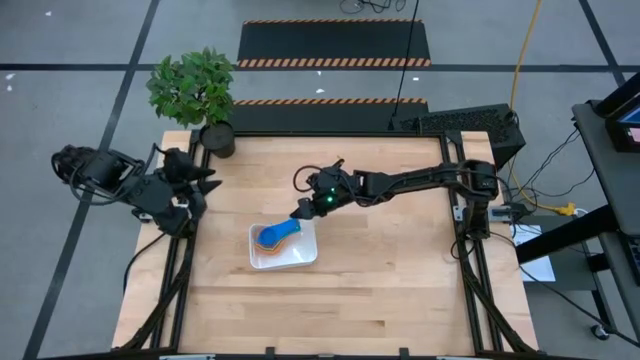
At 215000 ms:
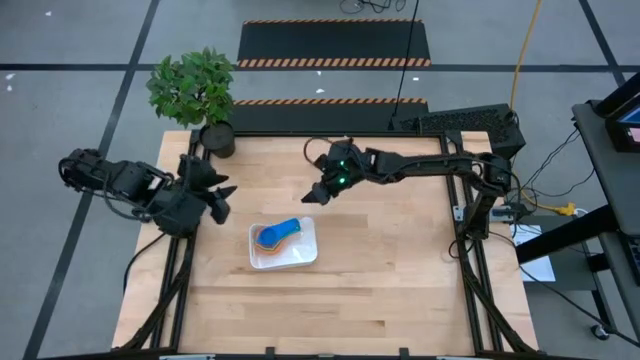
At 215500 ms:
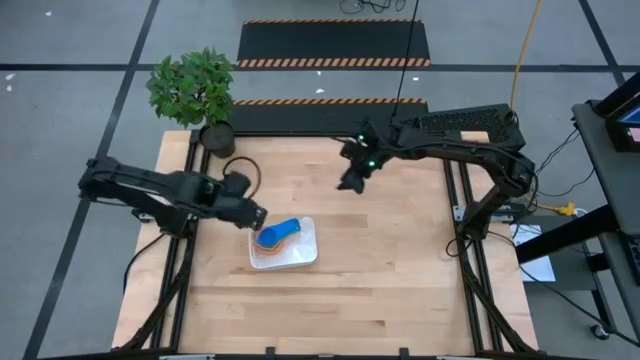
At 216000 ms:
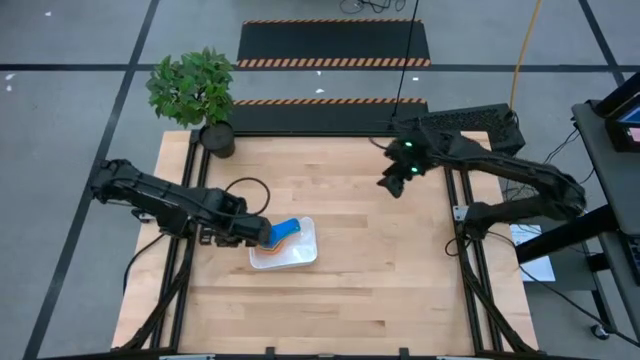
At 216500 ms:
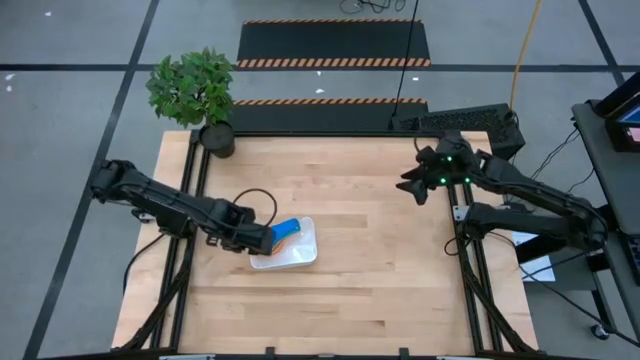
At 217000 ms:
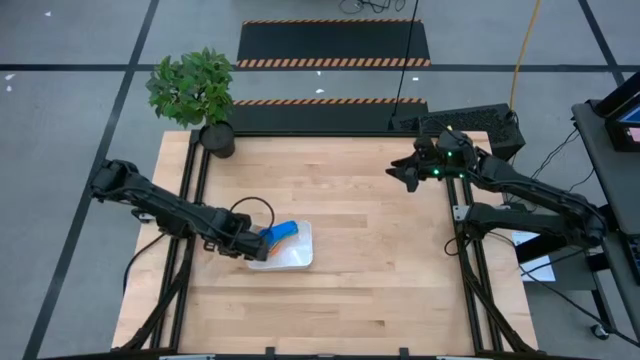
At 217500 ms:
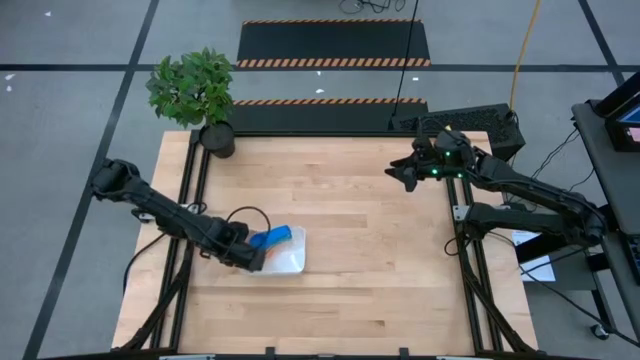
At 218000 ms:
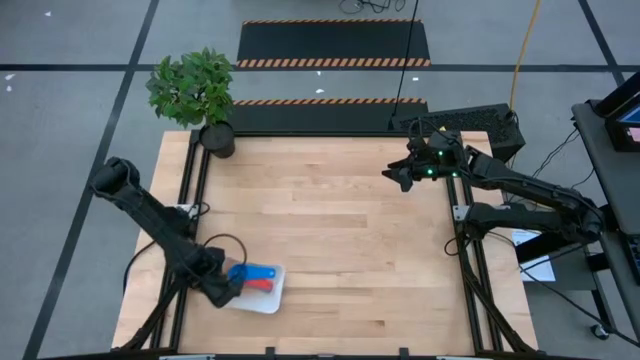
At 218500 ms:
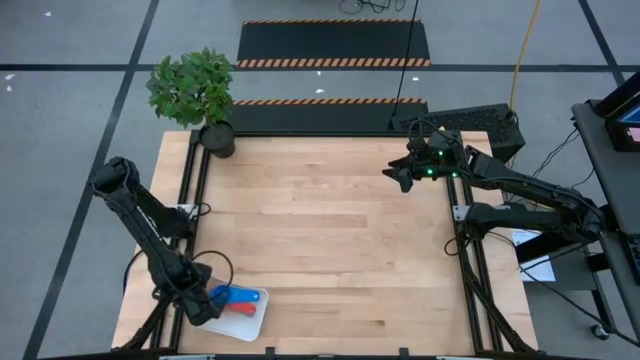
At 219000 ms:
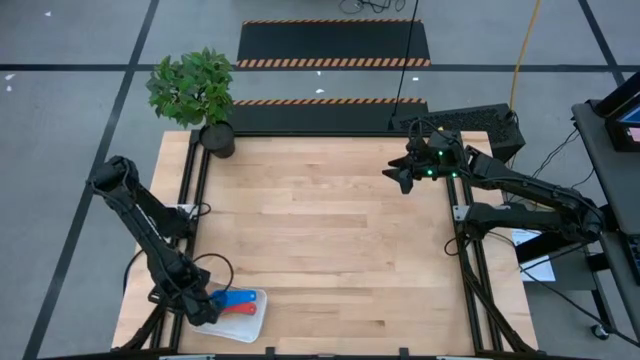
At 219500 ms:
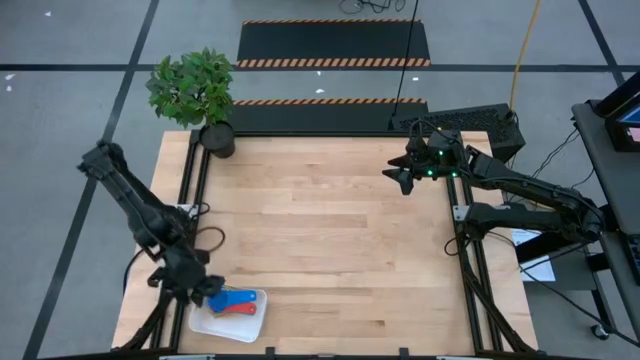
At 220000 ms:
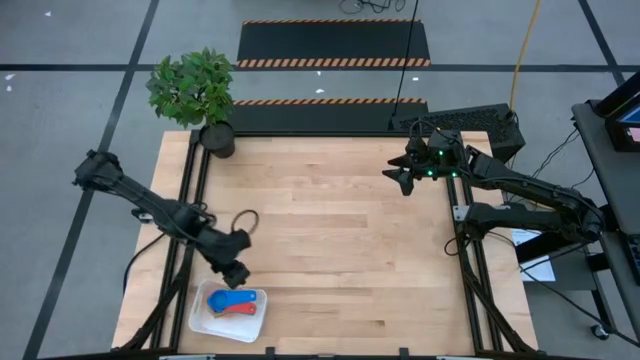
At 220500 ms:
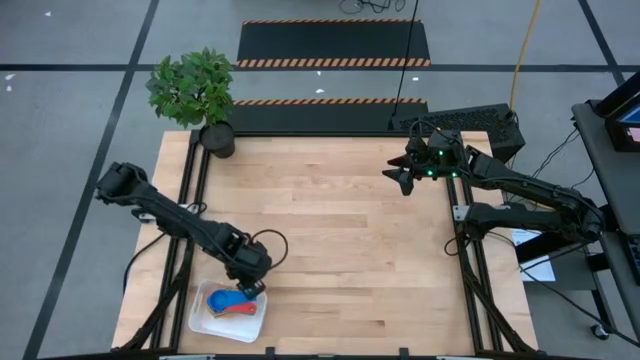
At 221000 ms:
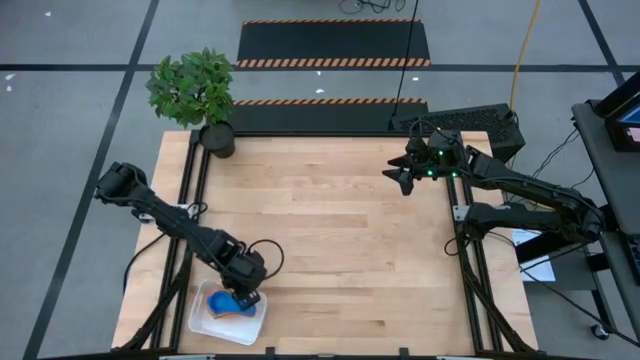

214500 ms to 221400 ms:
Task: Nest measuring cups in basket
Move the white bin to the bottom left of the table

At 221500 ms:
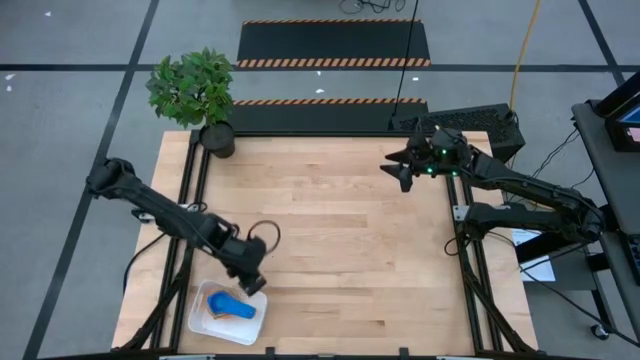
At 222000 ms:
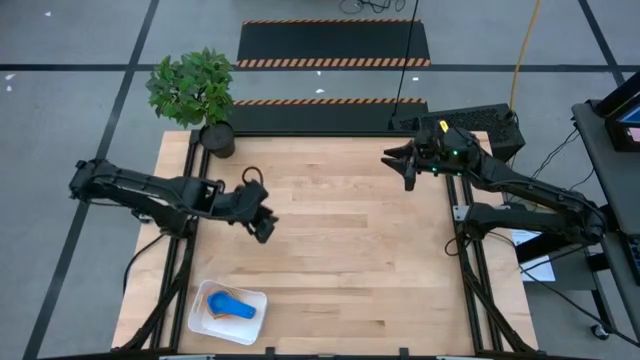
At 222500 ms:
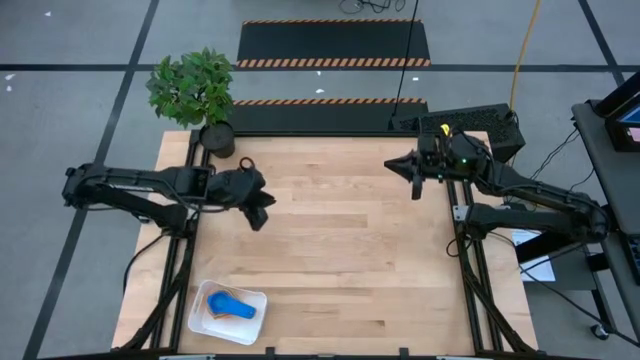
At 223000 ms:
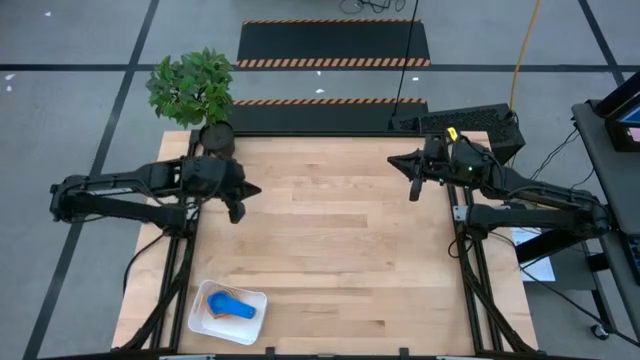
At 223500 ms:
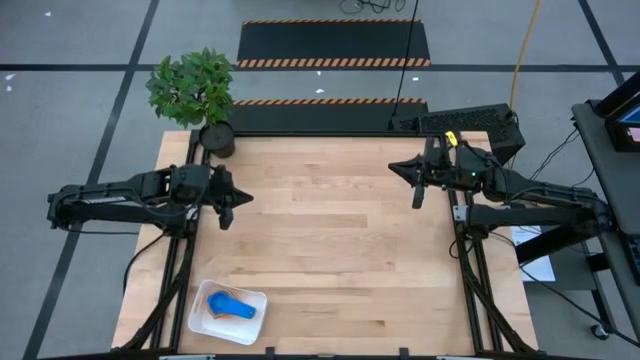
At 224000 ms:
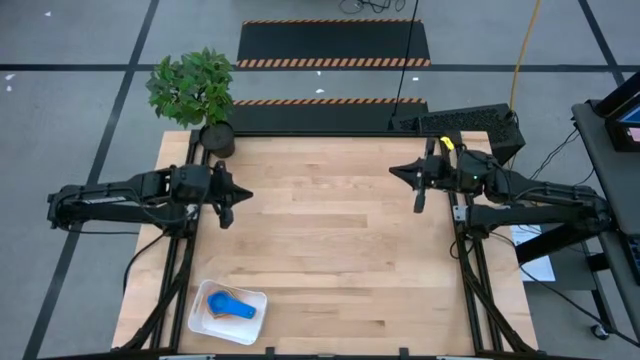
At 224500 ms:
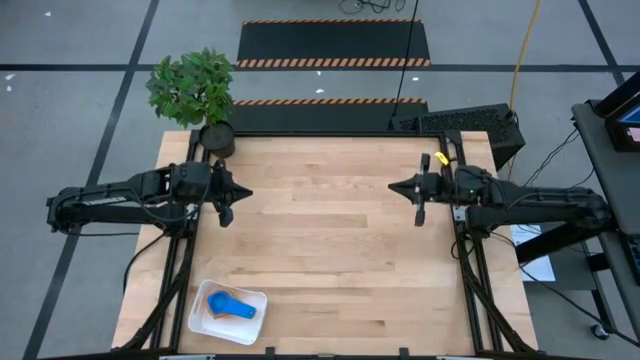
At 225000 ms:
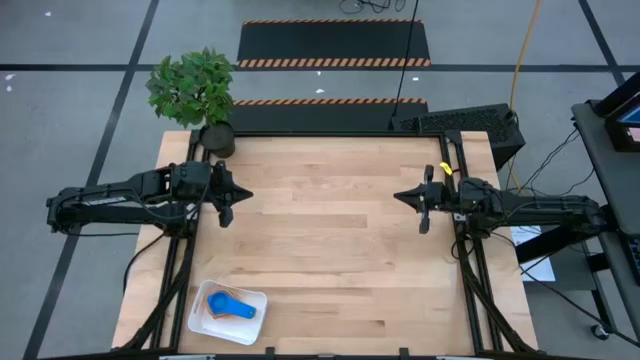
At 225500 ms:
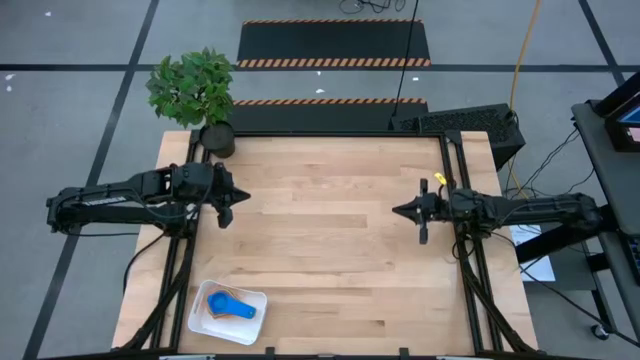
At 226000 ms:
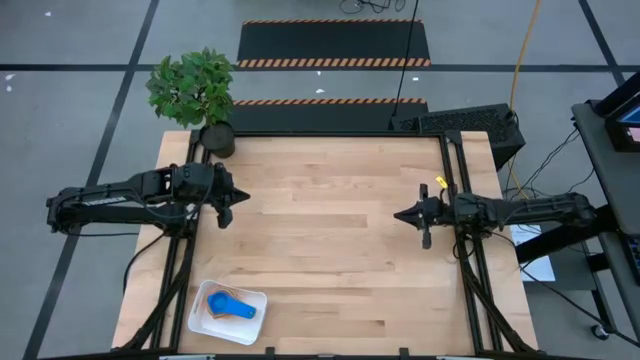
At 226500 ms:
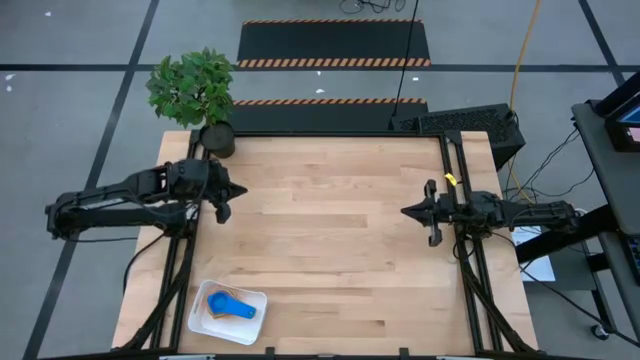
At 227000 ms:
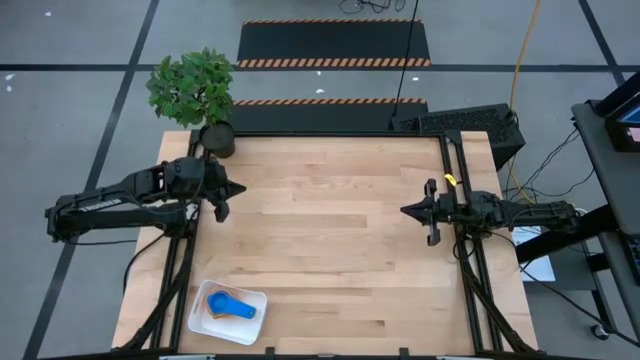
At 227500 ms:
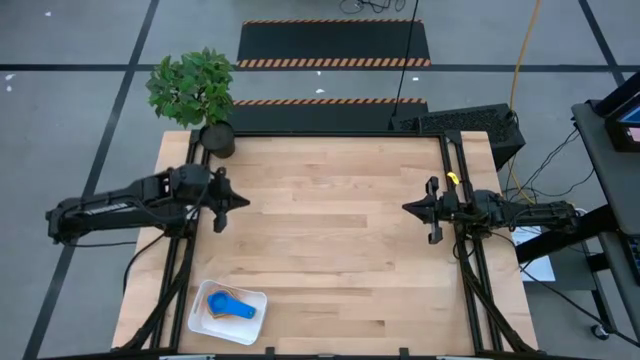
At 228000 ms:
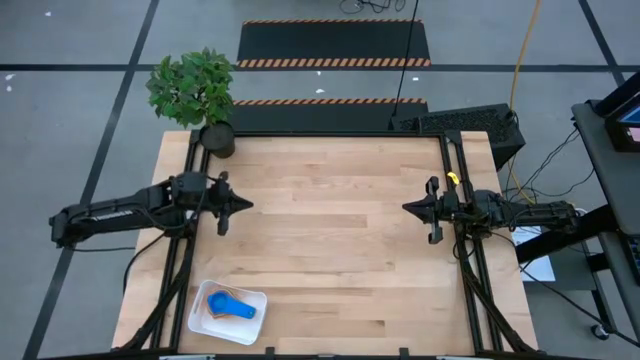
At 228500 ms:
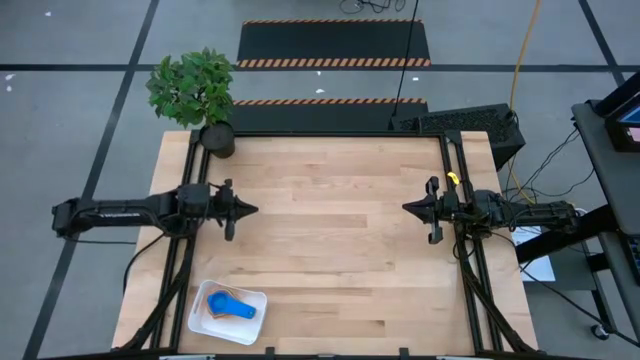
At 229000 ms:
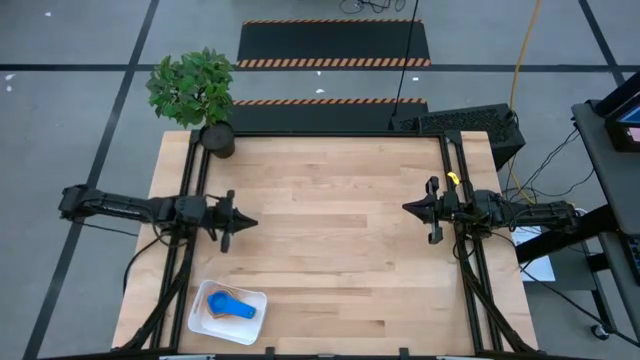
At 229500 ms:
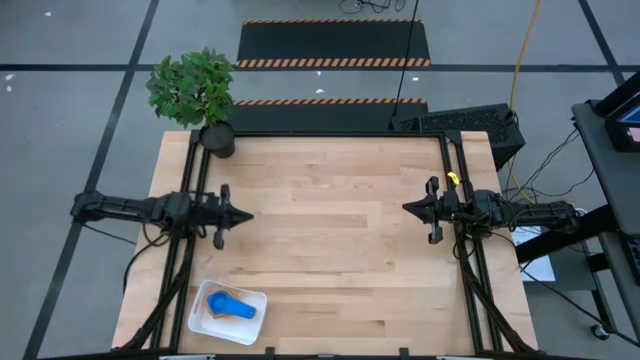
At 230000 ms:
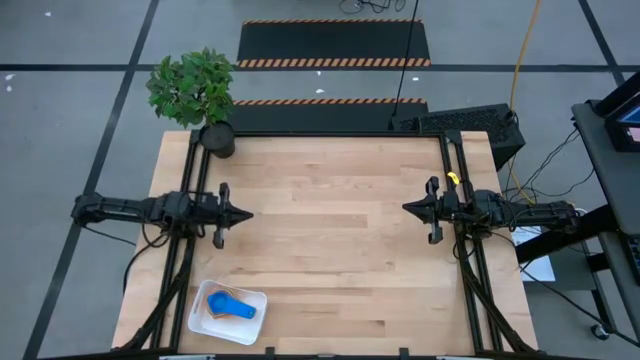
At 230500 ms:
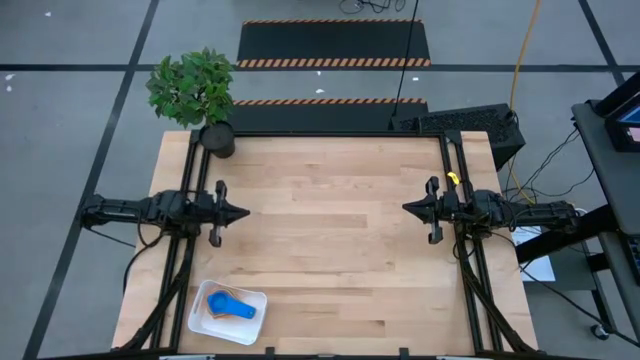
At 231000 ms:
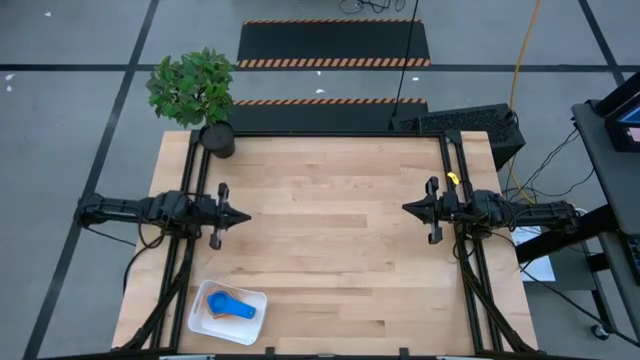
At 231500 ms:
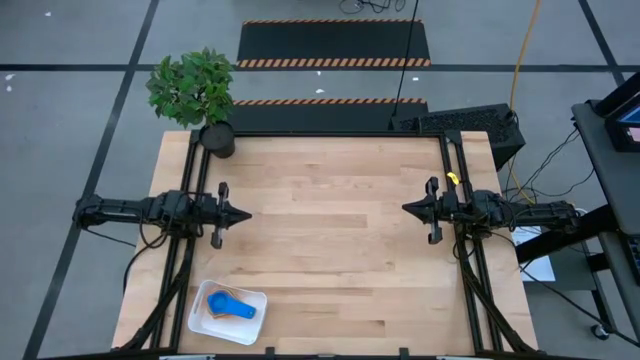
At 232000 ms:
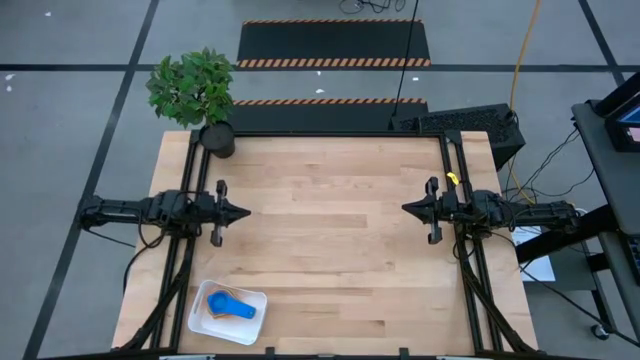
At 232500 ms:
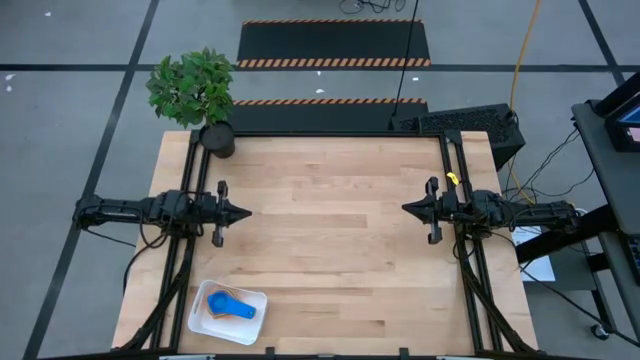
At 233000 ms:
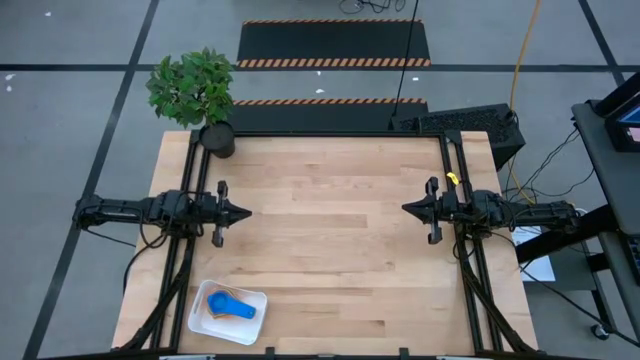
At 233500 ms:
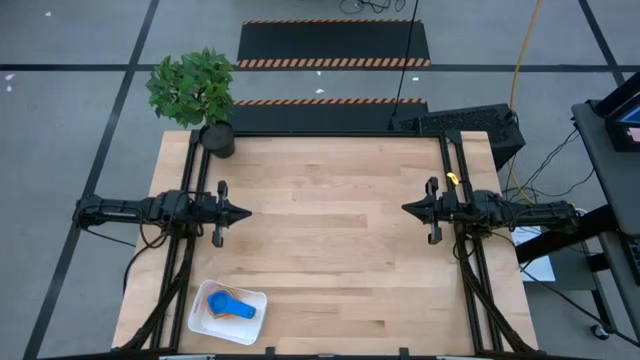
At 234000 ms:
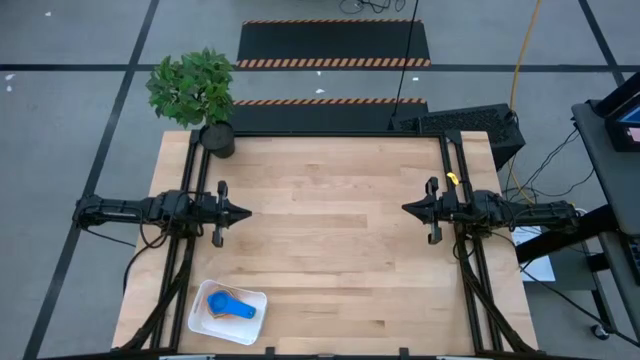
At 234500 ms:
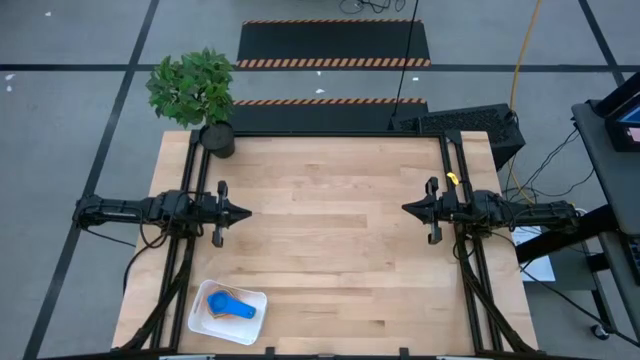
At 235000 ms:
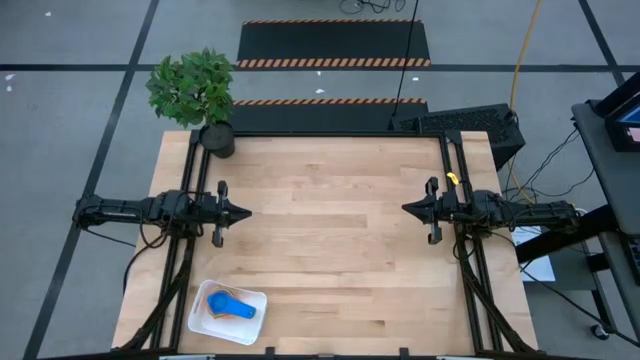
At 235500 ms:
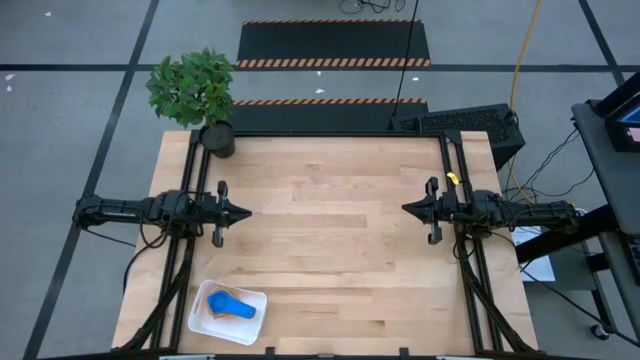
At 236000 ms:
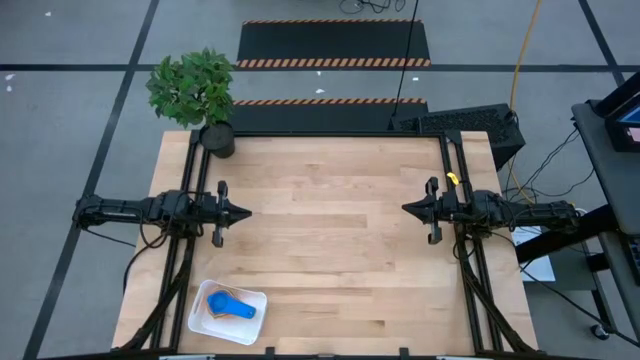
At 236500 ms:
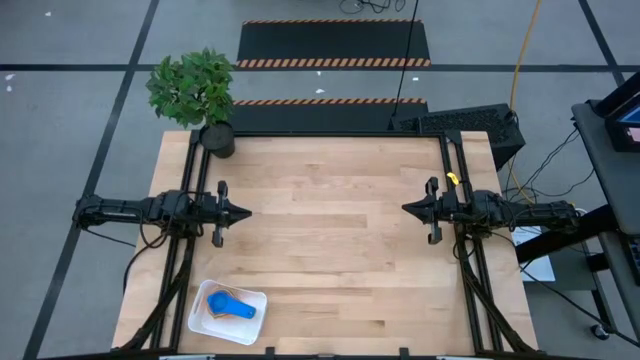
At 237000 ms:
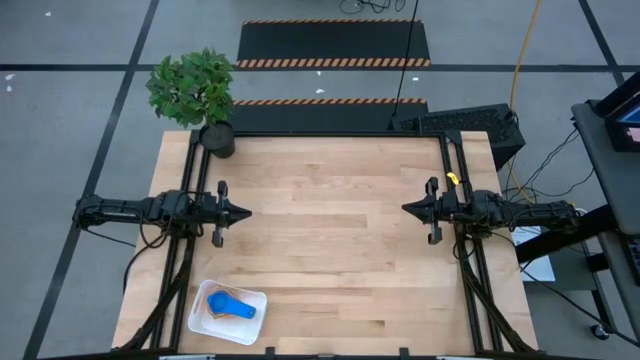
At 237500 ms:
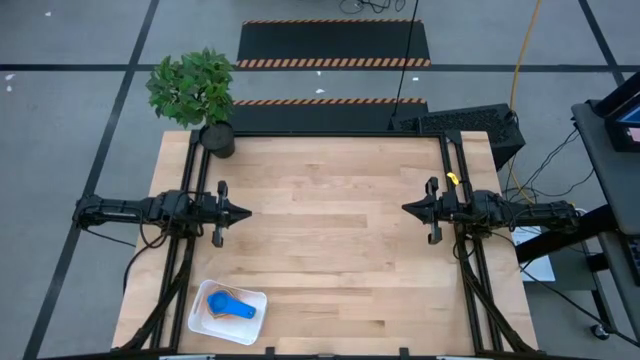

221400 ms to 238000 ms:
Return to Home Position
